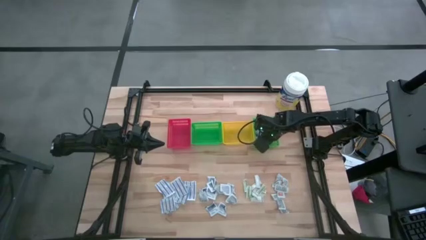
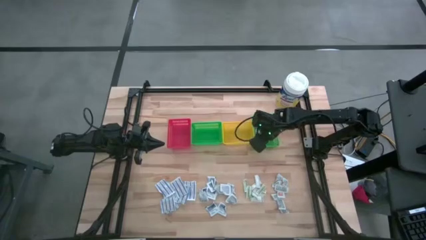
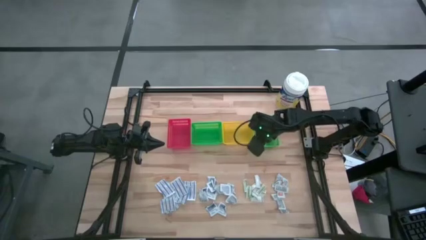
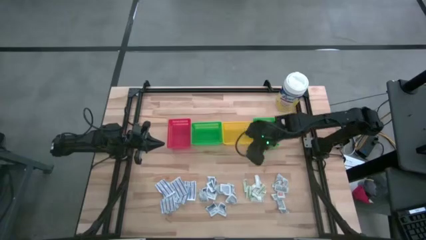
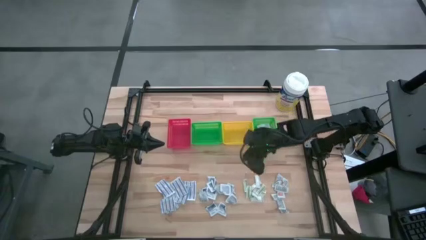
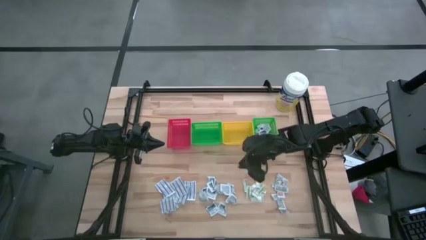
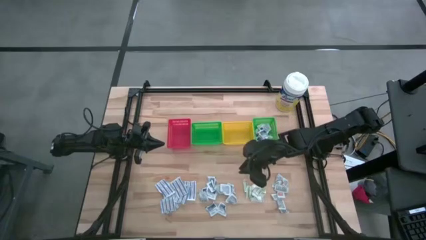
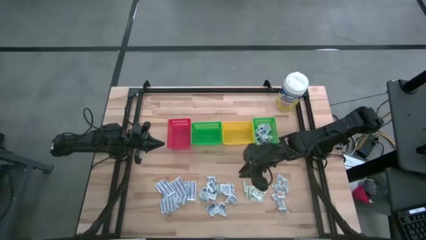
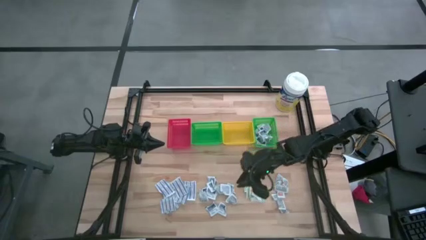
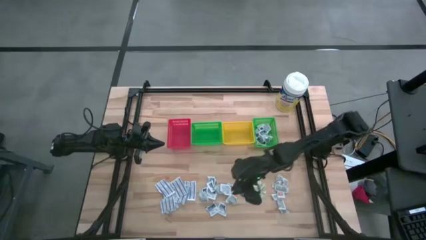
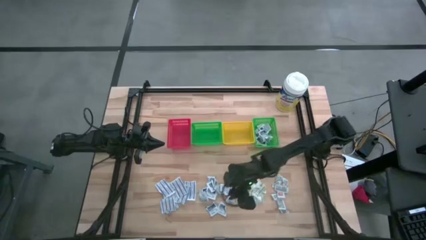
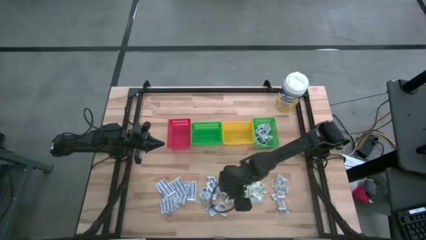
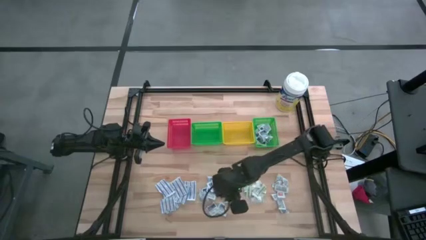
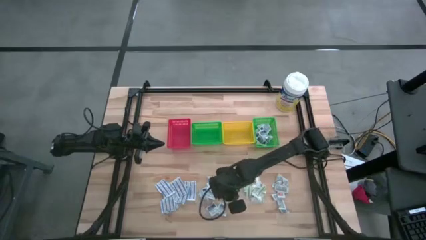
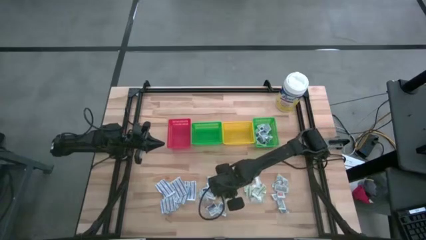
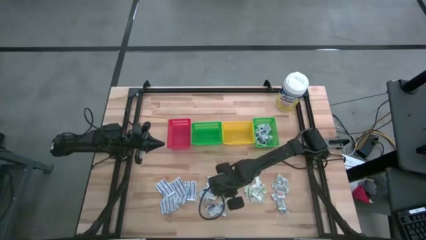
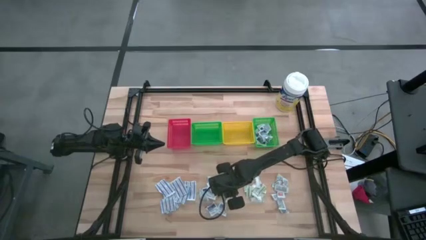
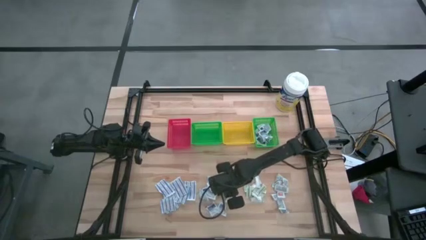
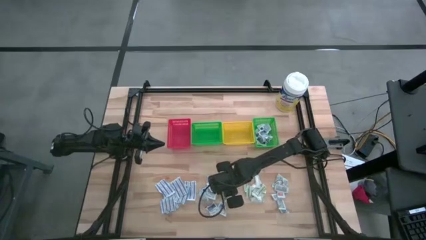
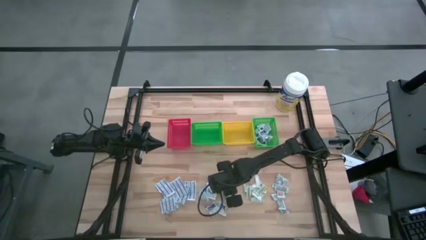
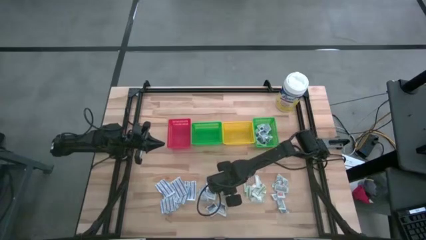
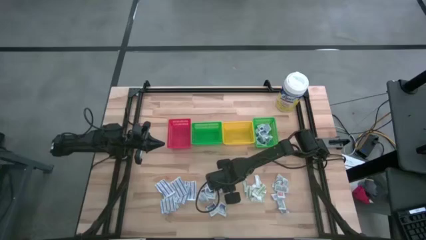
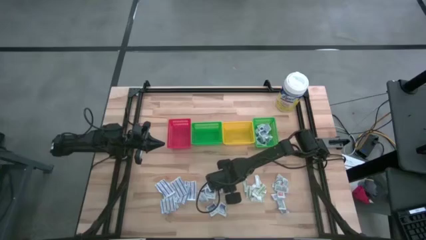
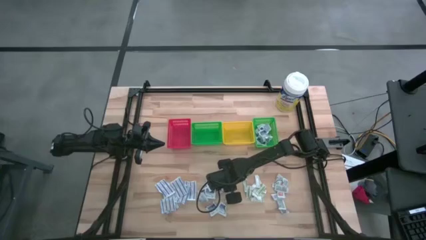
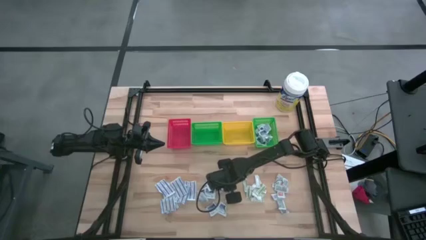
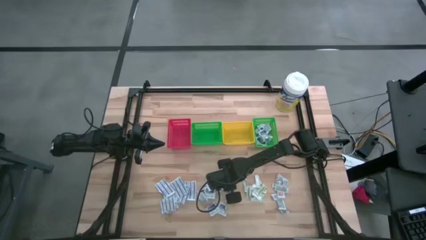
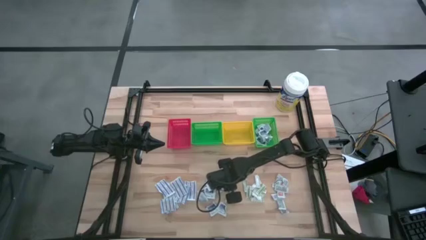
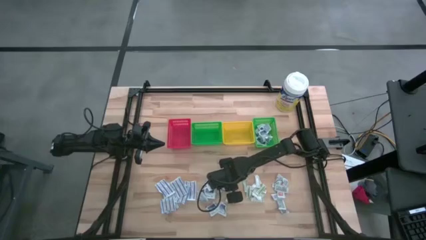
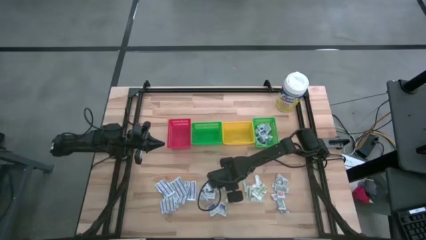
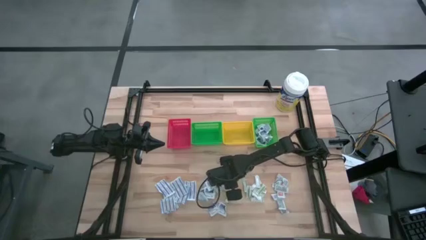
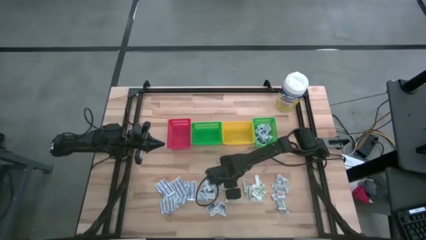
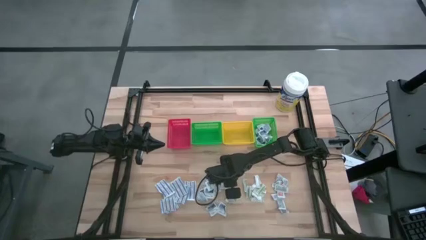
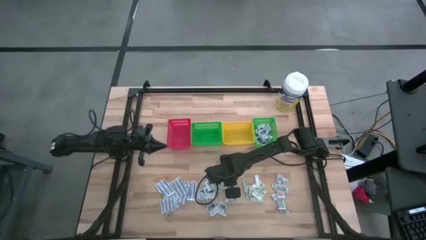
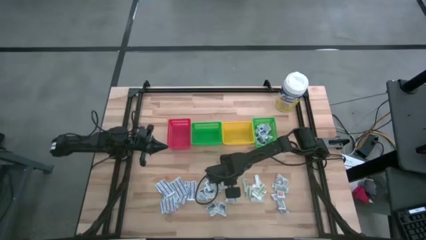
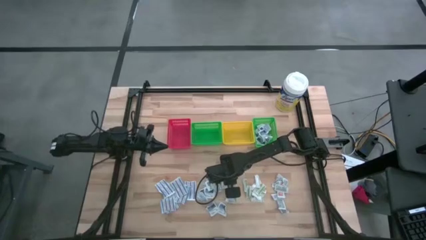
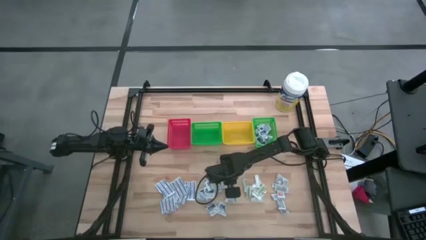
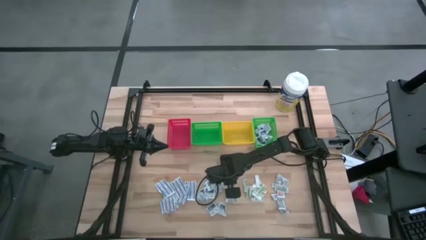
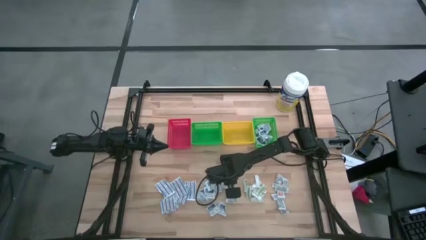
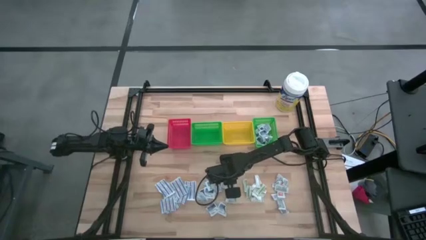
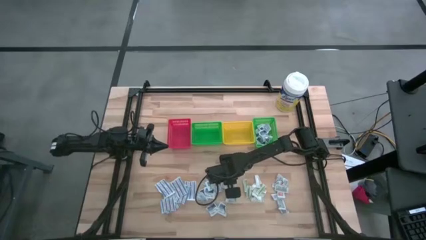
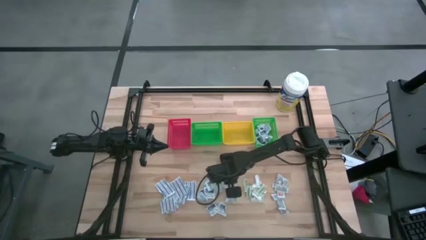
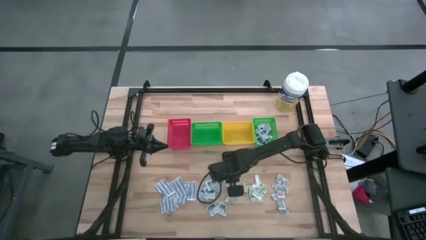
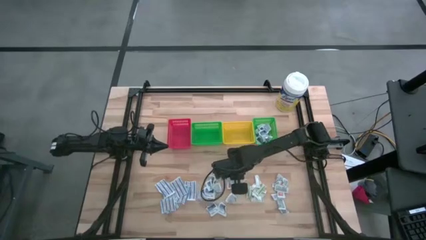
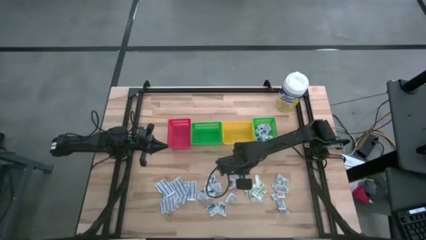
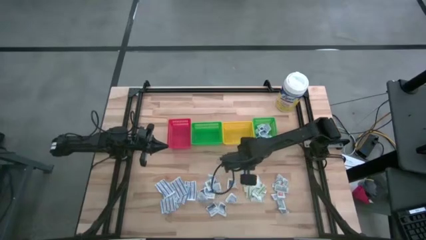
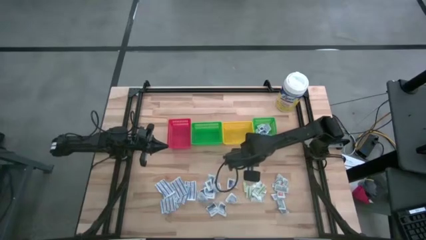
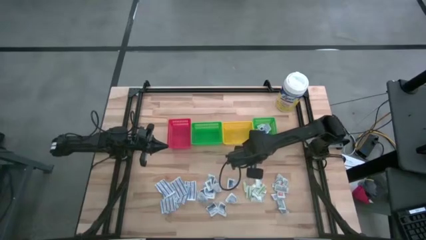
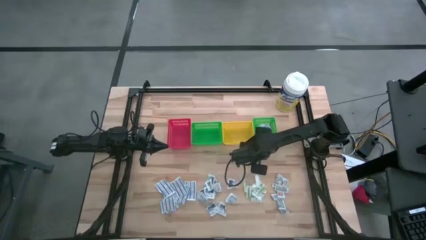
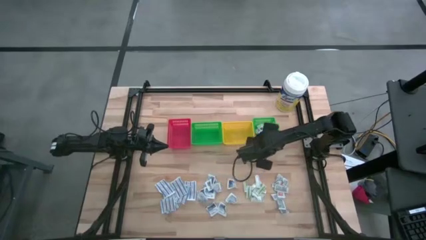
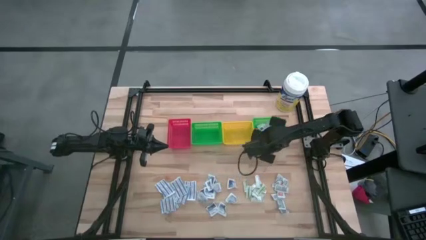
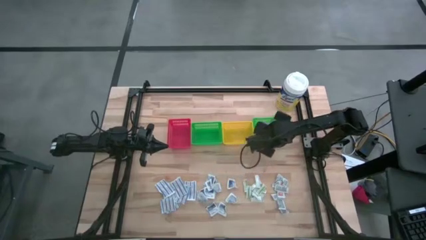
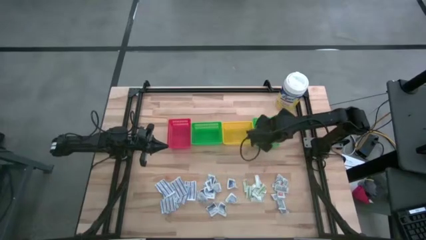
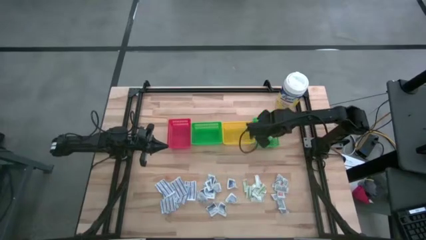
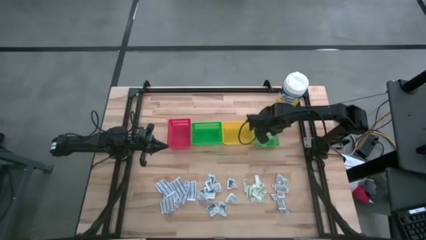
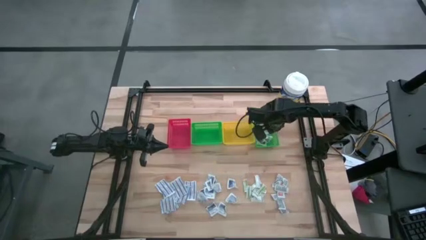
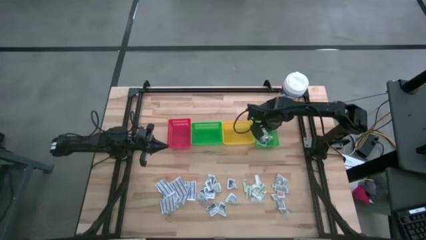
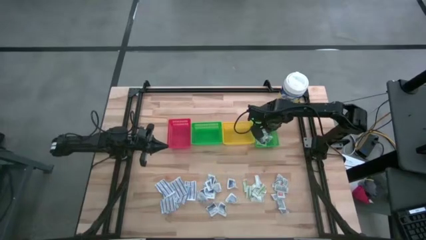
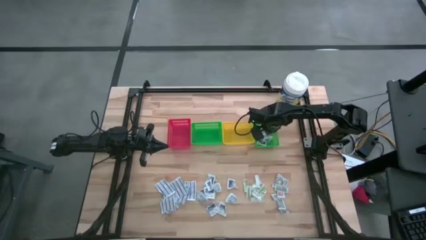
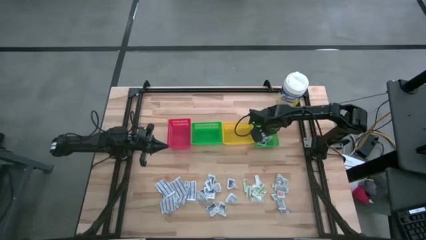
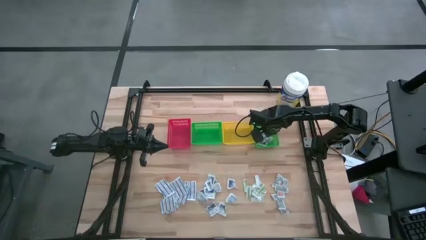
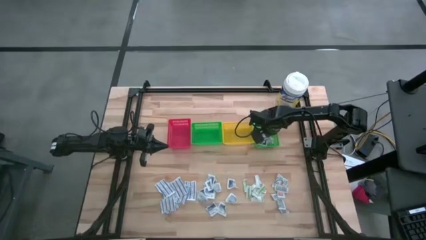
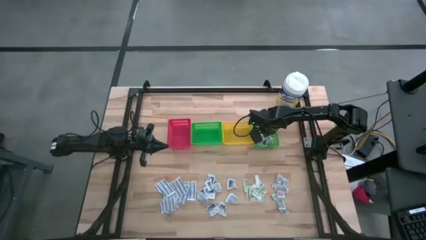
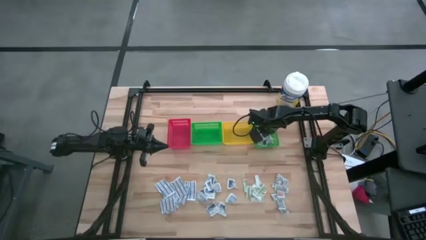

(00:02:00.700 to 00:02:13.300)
Task: Pick & Place First Aid Supplies
Put the blue alcohol pad into the right green bin
